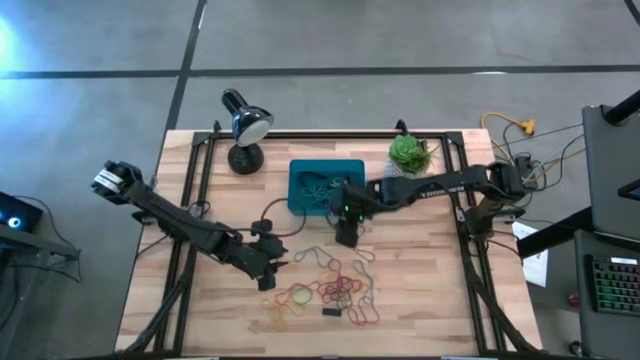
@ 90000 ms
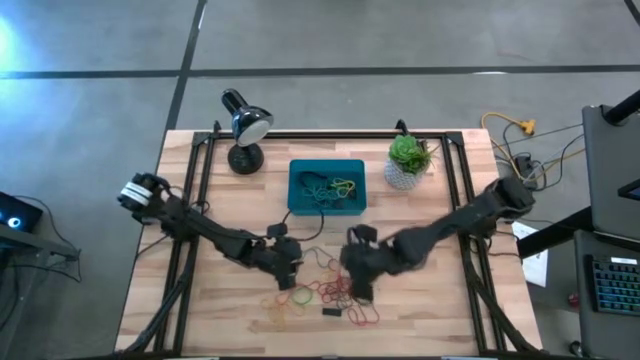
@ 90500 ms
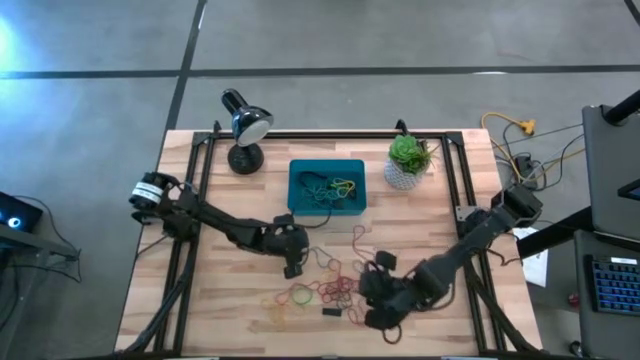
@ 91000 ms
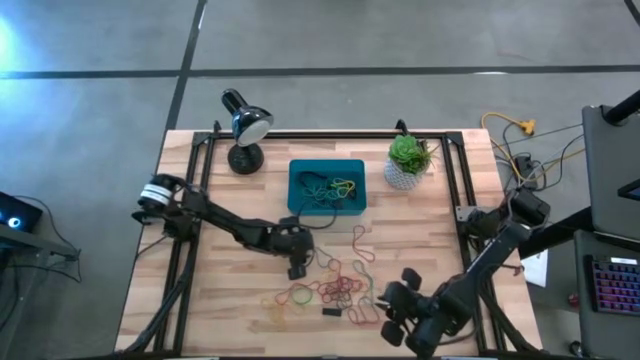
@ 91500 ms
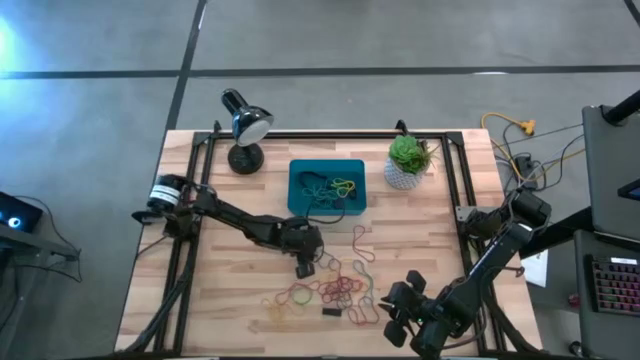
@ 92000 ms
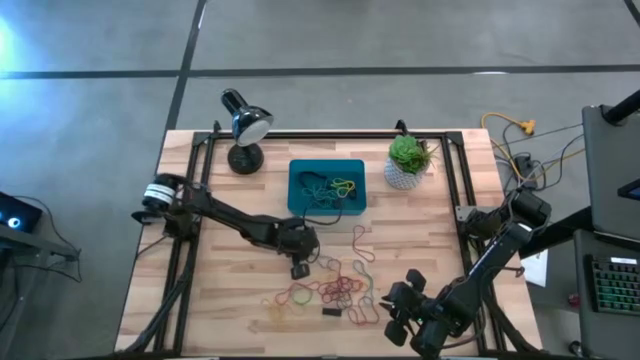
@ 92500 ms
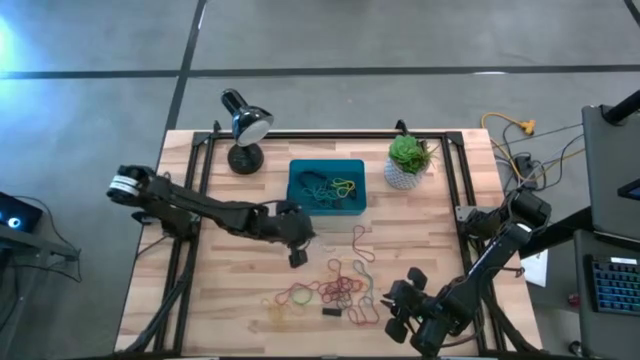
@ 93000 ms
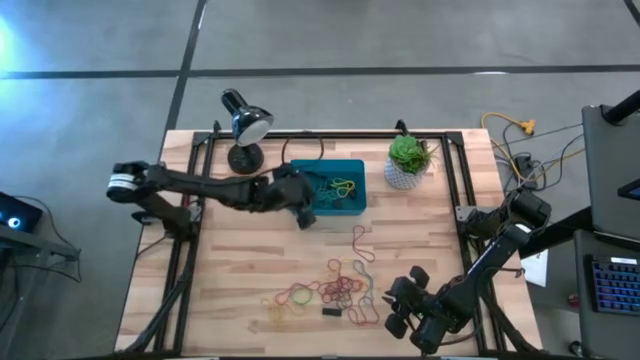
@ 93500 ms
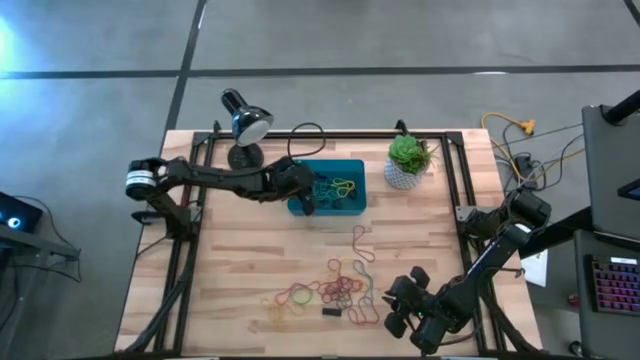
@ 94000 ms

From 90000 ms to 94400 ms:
Task: Pick and place rubber bands into bin
Put the blue rubber band into the dark blue bin

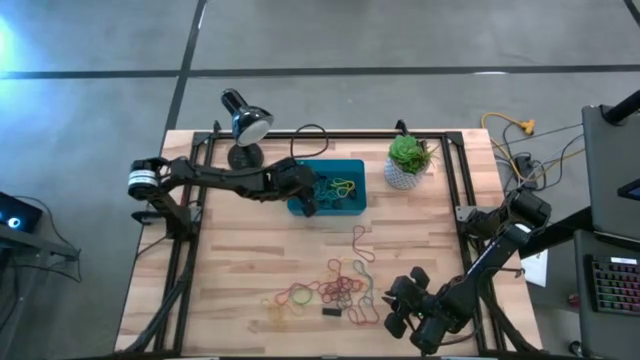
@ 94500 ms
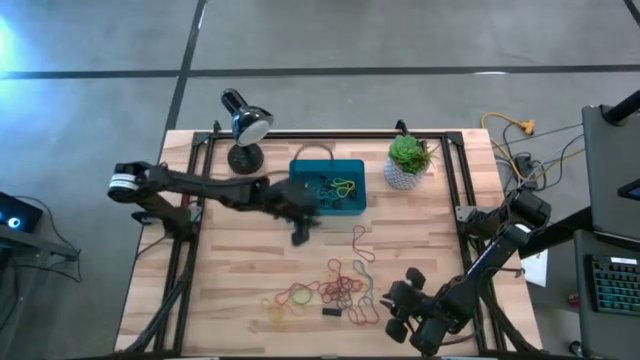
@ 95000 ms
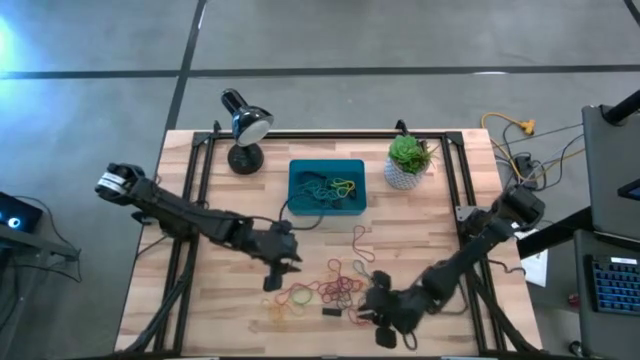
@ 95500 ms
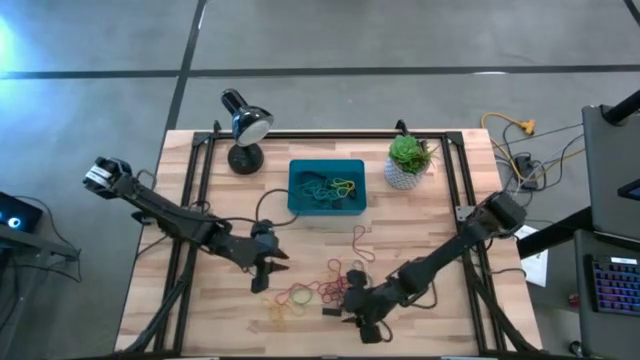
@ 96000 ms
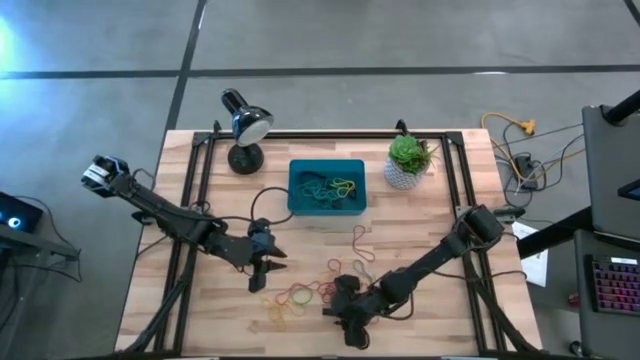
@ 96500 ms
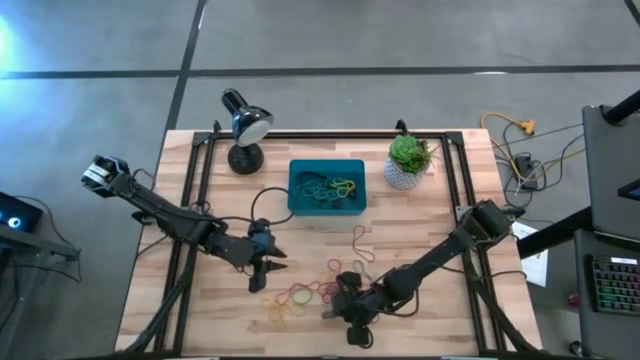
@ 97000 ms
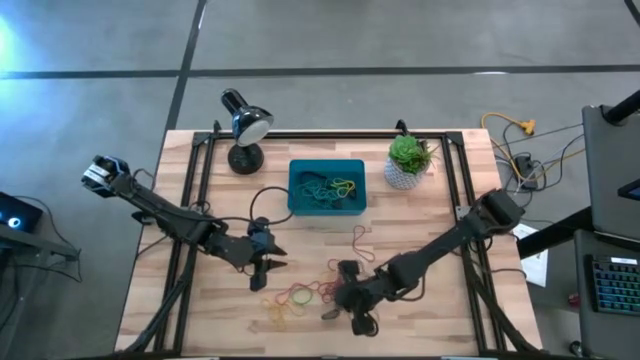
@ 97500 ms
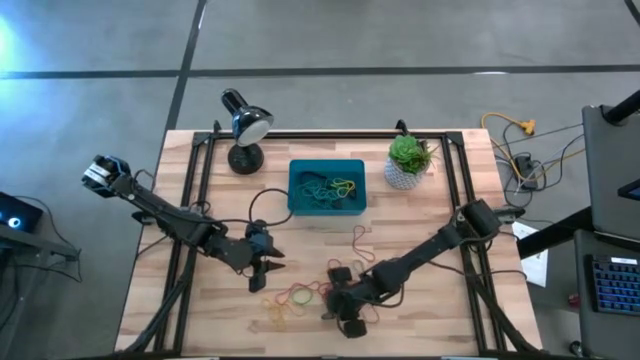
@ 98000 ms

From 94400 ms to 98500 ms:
Put the black rubber band into the dark blue bin

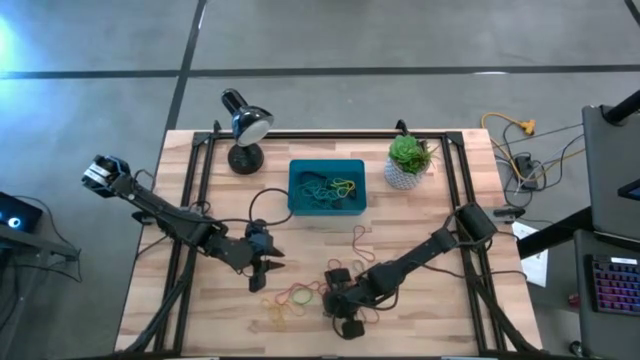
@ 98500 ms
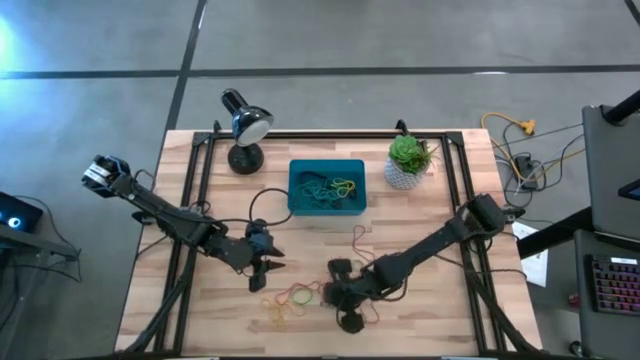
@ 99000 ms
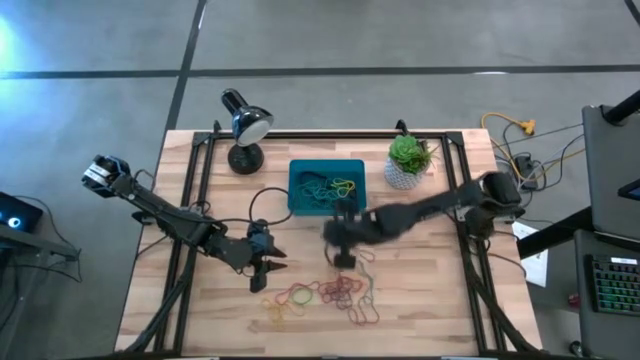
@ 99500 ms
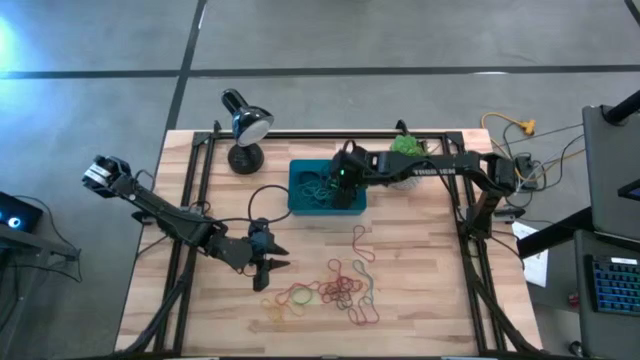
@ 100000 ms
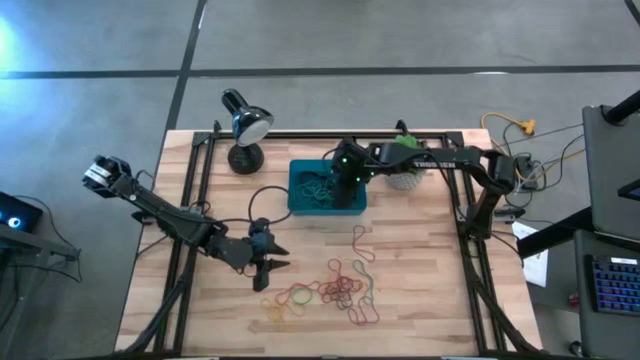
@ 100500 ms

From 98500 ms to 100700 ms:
Put the black rubber band into the dark blue bin

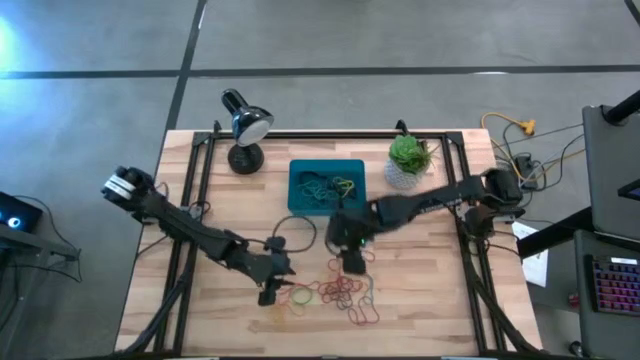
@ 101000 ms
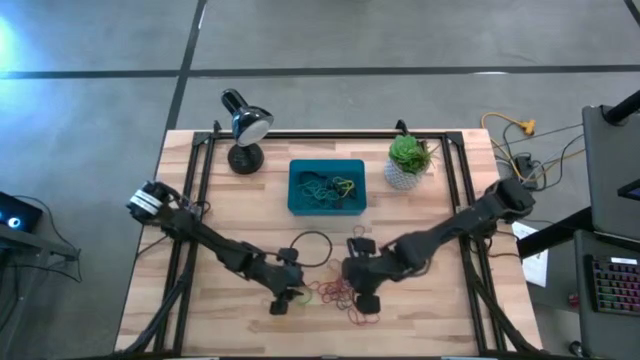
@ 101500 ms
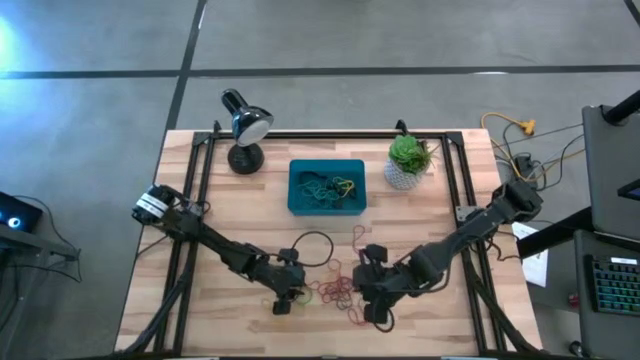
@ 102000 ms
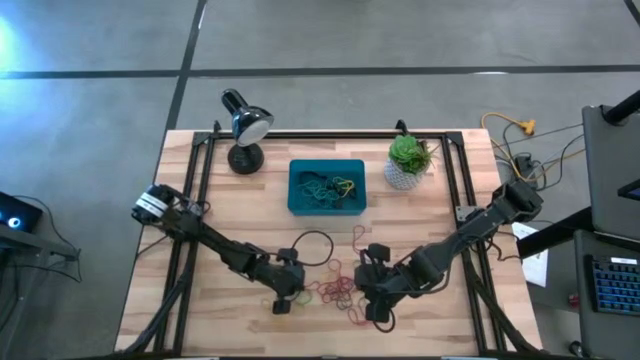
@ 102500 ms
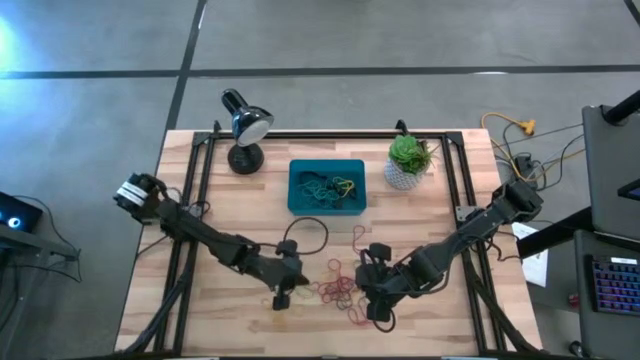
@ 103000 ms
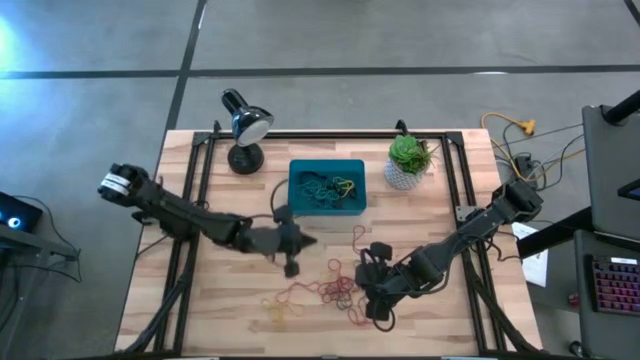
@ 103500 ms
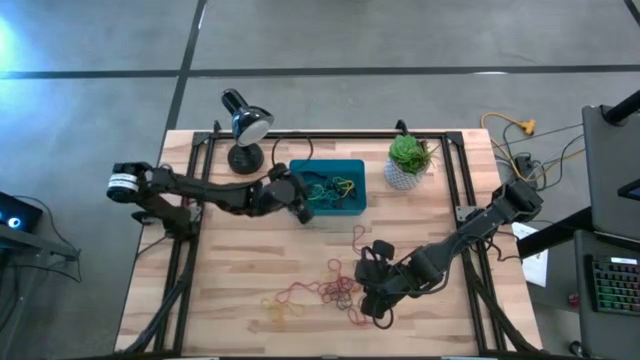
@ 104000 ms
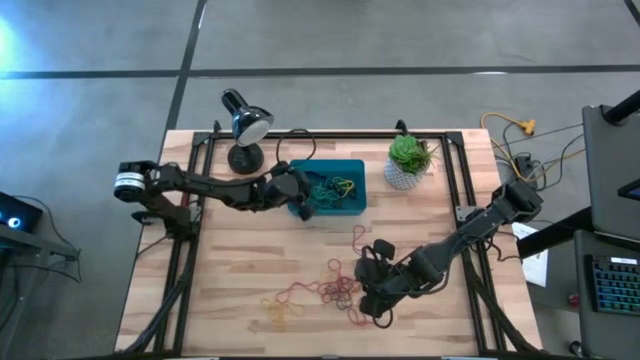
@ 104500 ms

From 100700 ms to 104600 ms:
Put the green rubber band into the dark blue bin

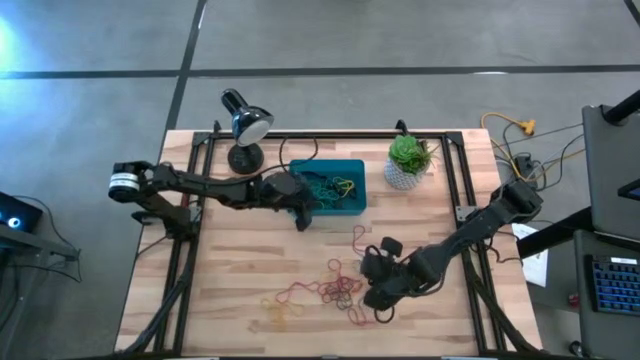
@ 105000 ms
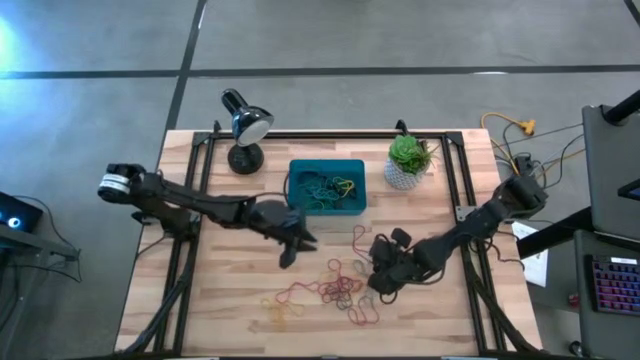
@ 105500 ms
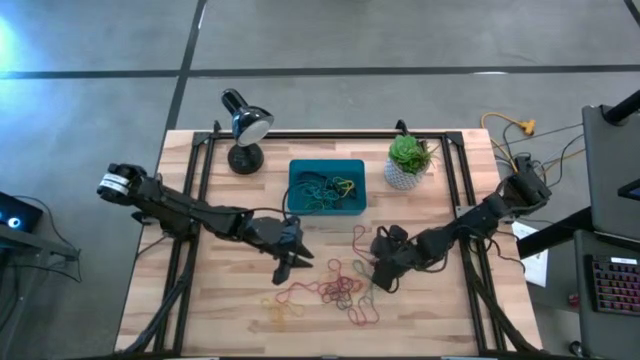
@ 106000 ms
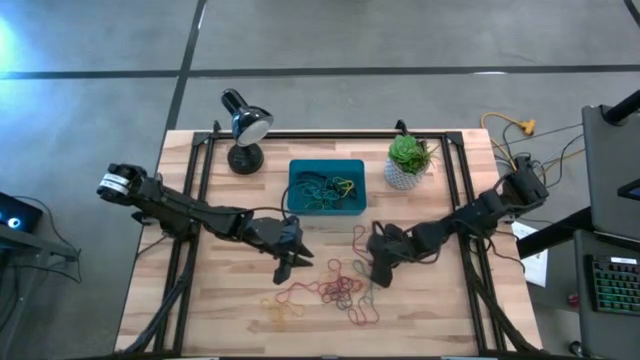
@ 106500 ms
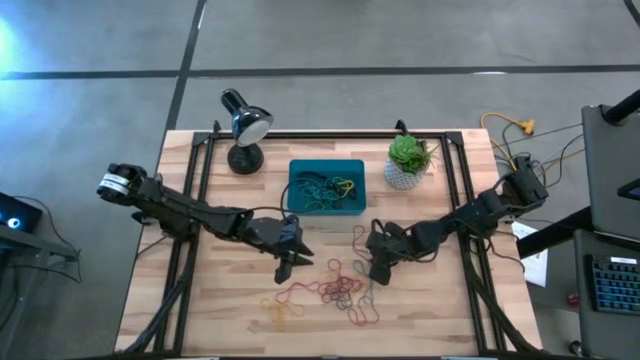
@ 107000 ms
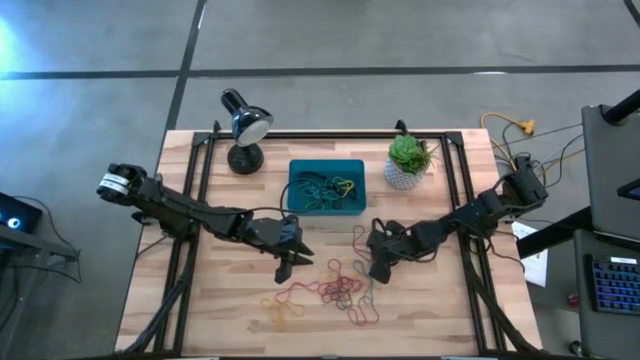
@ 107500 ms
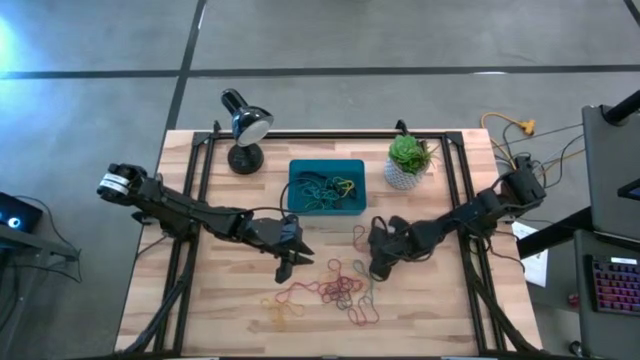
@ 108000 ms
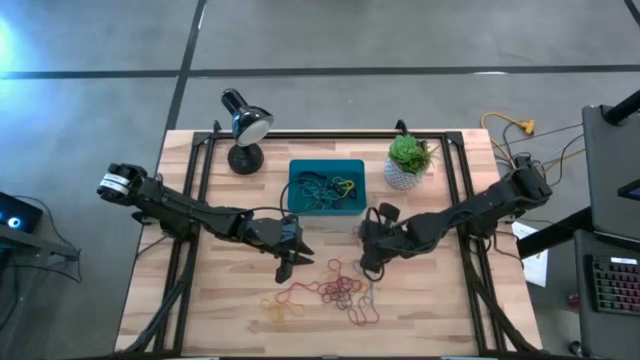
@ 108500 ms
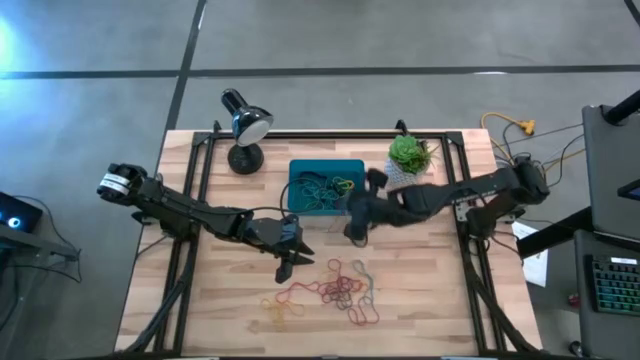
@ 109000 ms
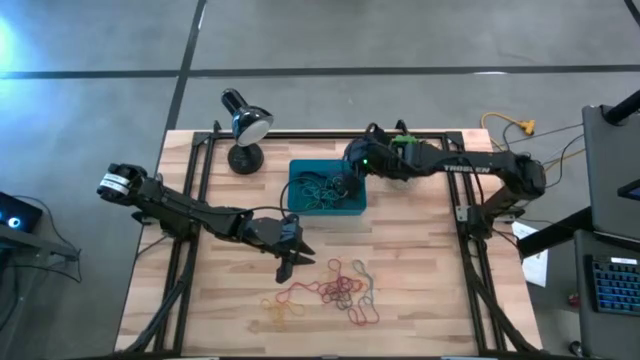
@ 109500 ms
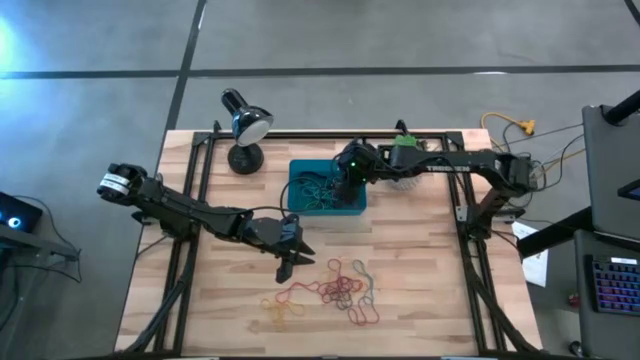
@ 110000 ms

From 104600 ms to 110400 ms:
Put the red rubber band into the dark blue bin
